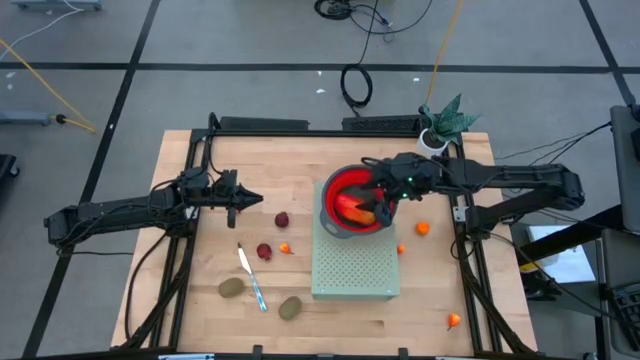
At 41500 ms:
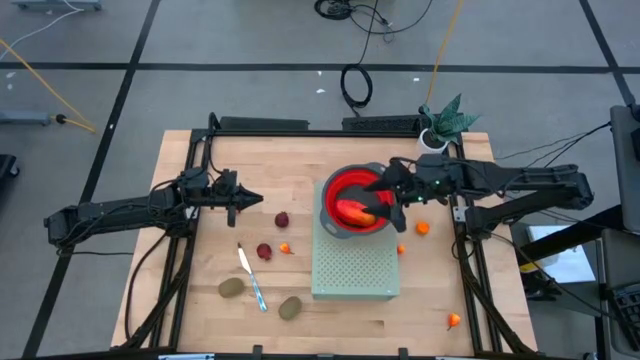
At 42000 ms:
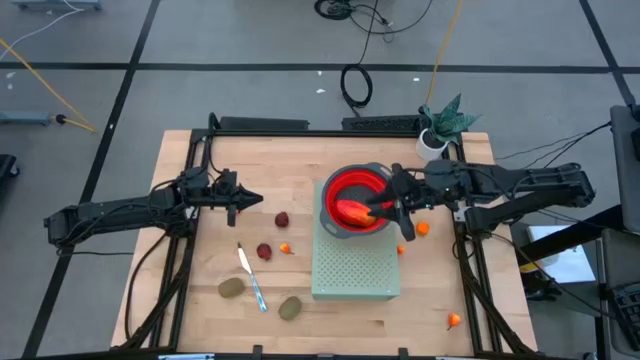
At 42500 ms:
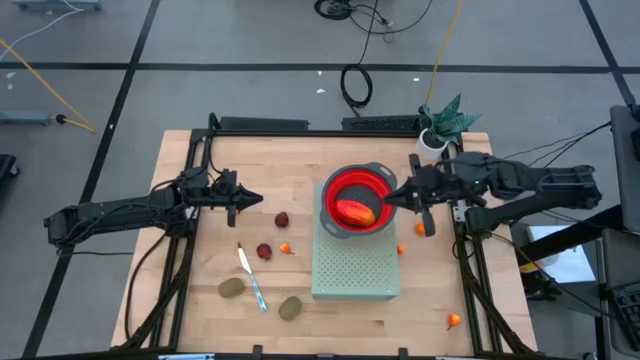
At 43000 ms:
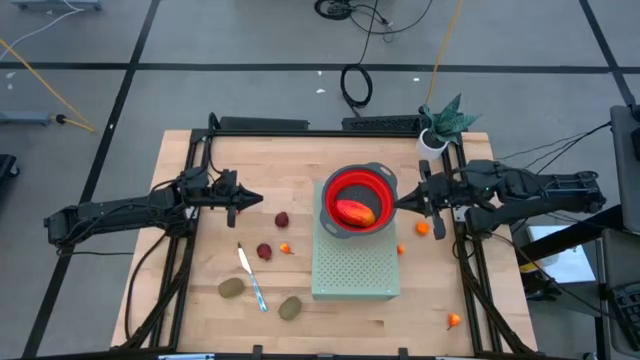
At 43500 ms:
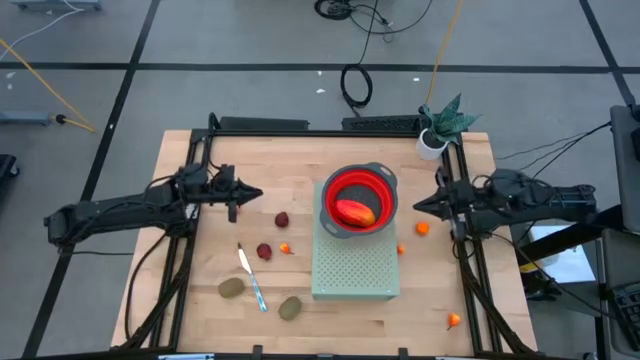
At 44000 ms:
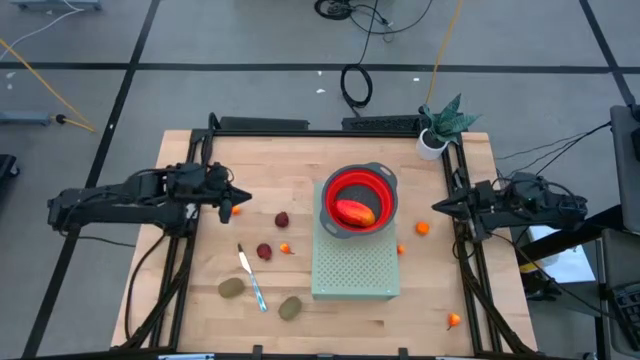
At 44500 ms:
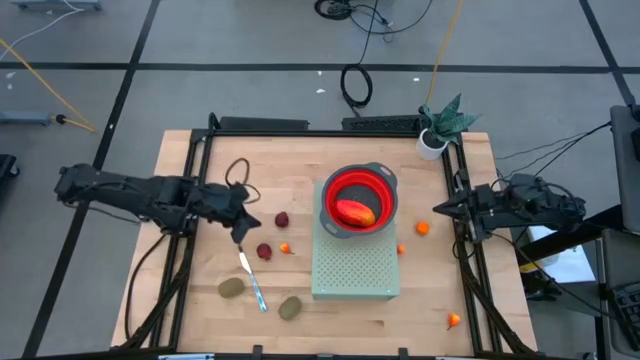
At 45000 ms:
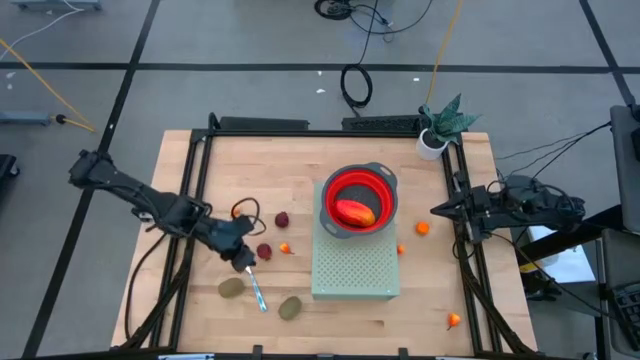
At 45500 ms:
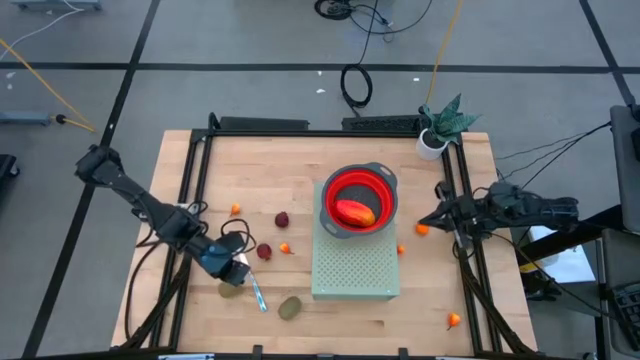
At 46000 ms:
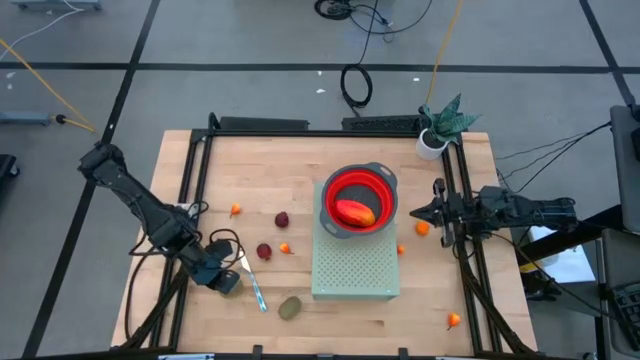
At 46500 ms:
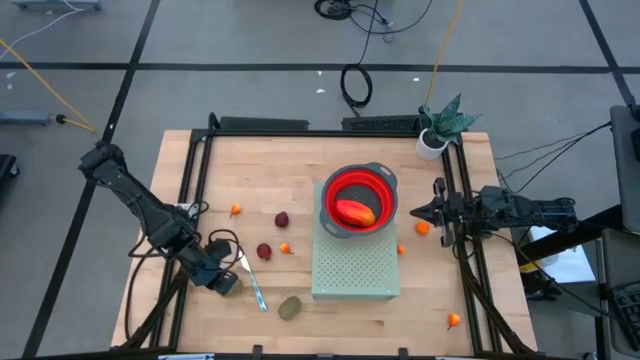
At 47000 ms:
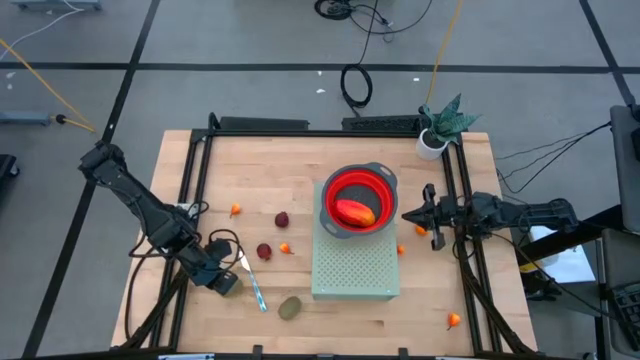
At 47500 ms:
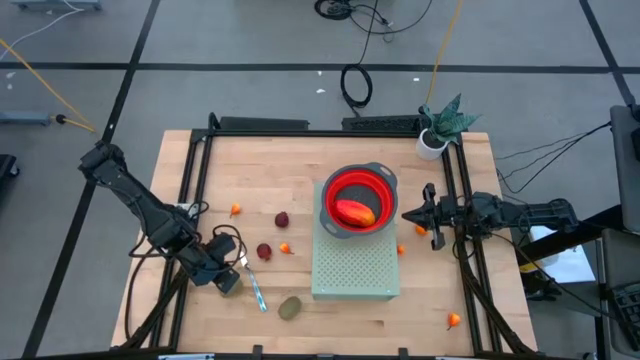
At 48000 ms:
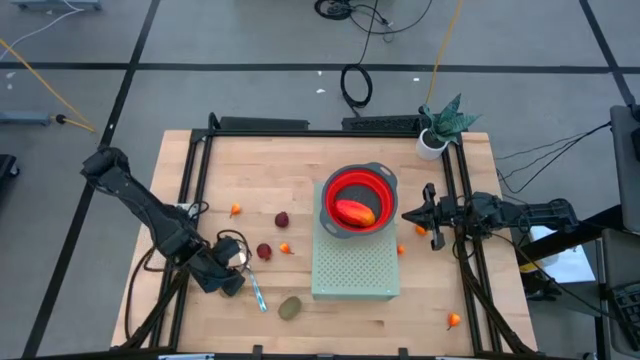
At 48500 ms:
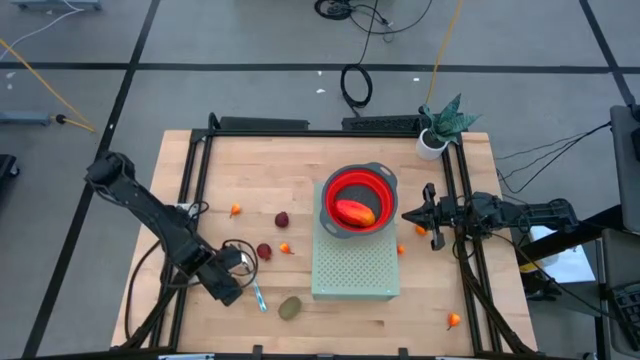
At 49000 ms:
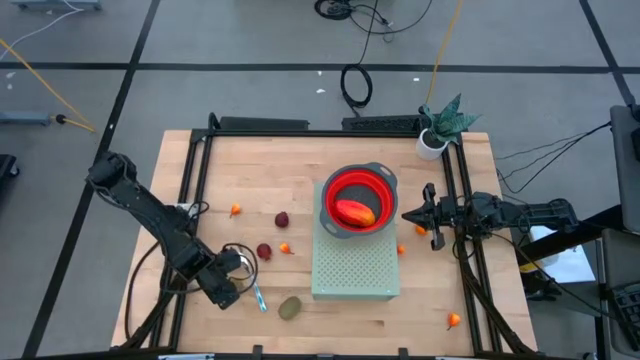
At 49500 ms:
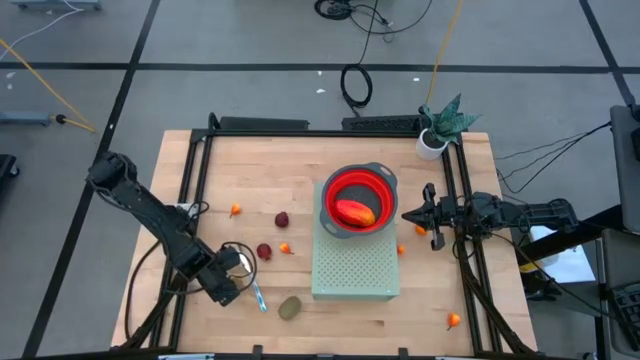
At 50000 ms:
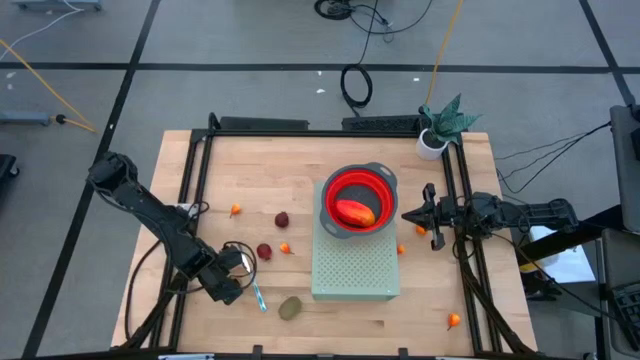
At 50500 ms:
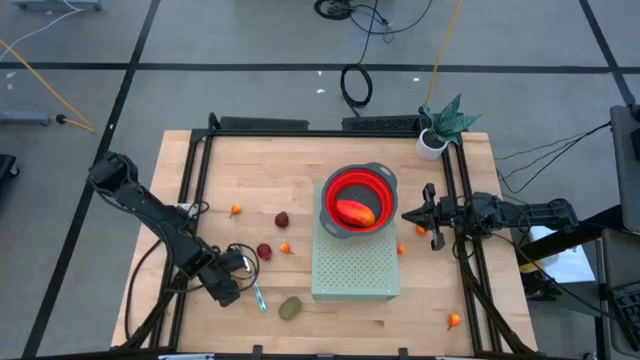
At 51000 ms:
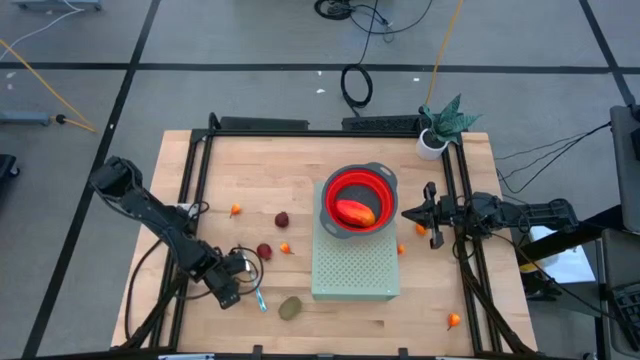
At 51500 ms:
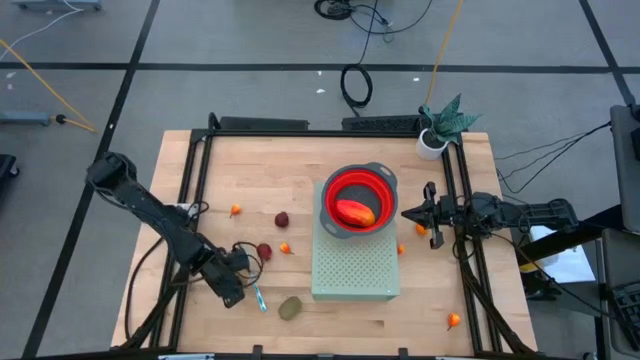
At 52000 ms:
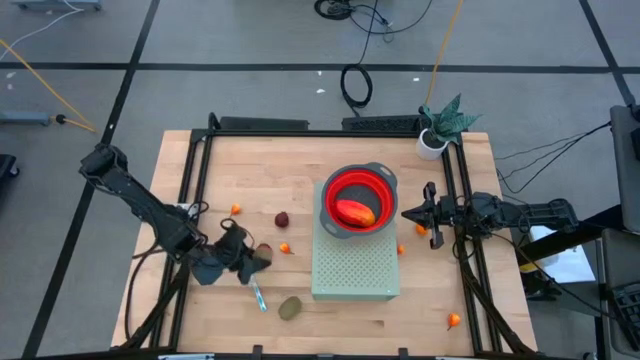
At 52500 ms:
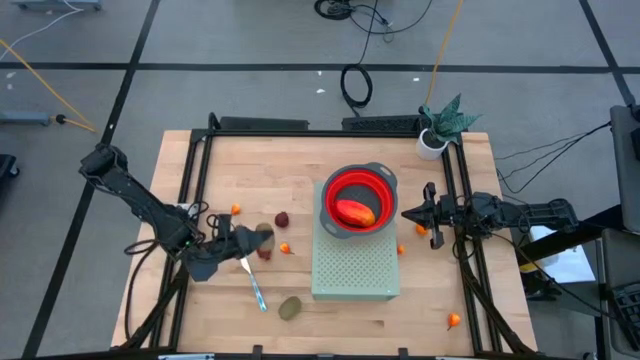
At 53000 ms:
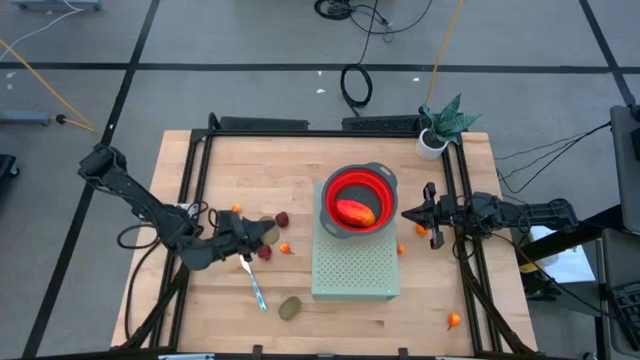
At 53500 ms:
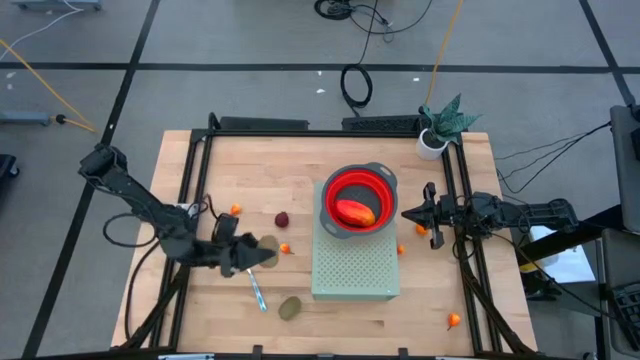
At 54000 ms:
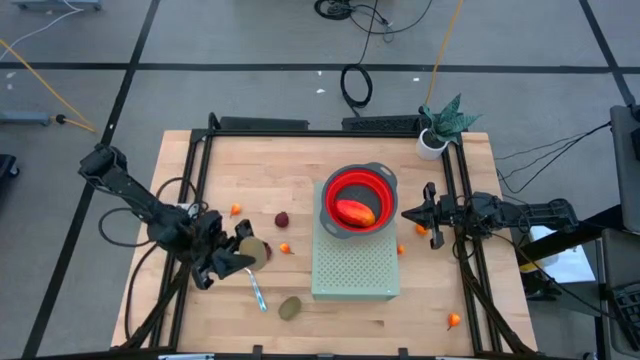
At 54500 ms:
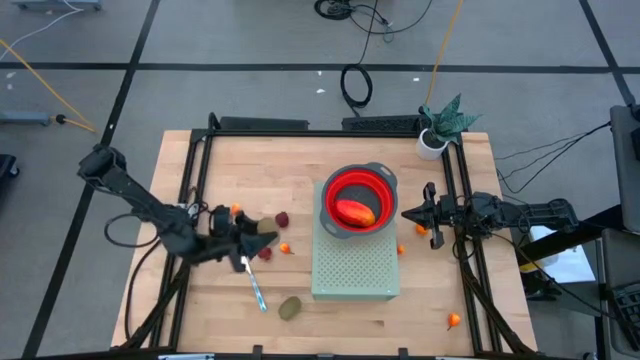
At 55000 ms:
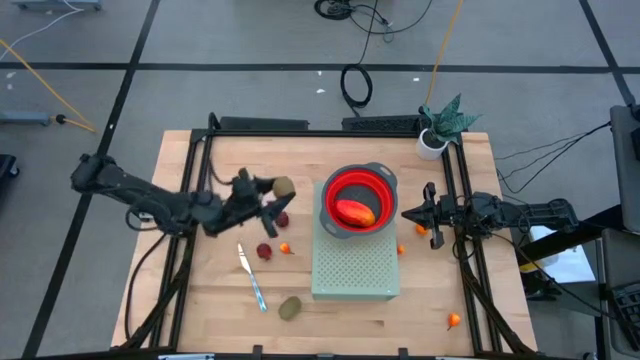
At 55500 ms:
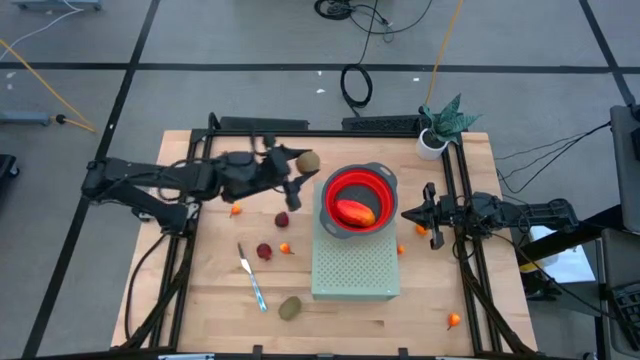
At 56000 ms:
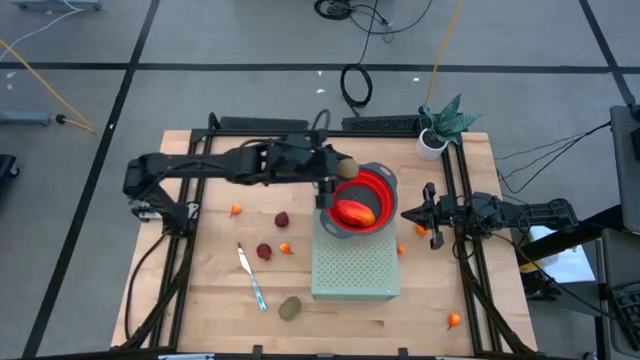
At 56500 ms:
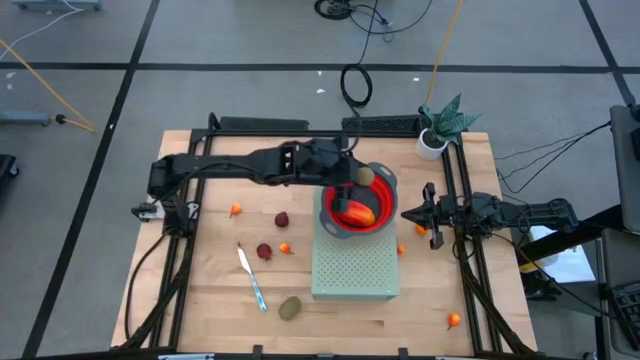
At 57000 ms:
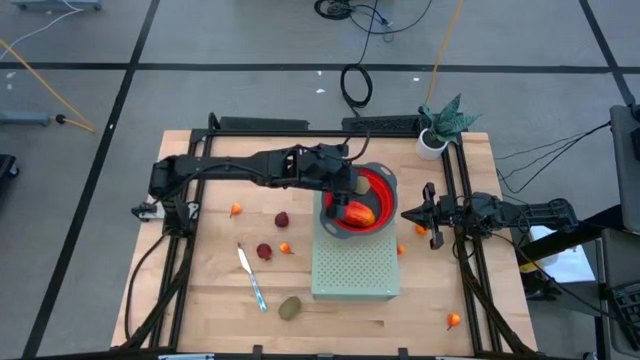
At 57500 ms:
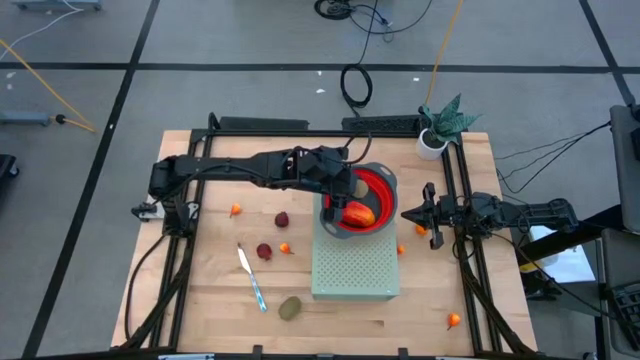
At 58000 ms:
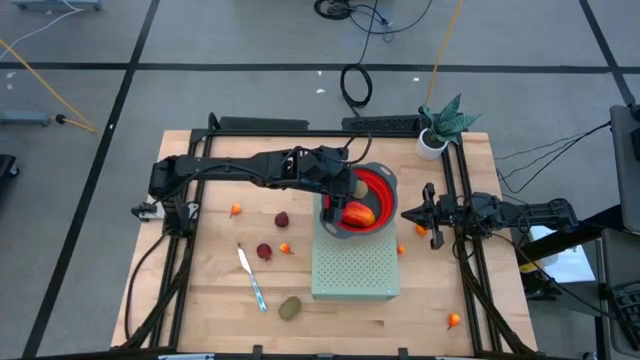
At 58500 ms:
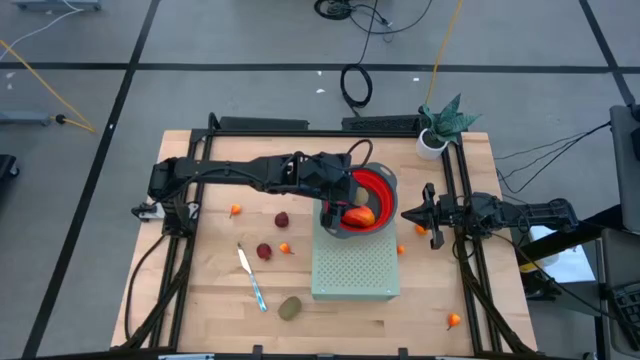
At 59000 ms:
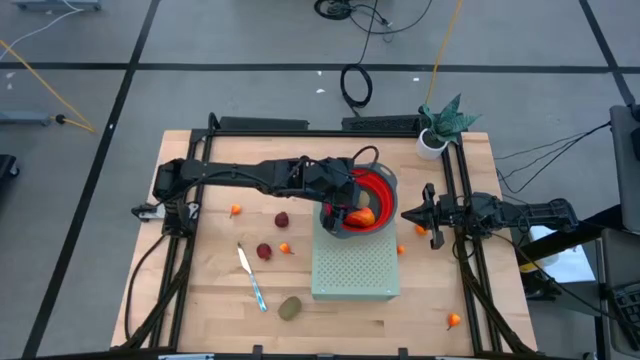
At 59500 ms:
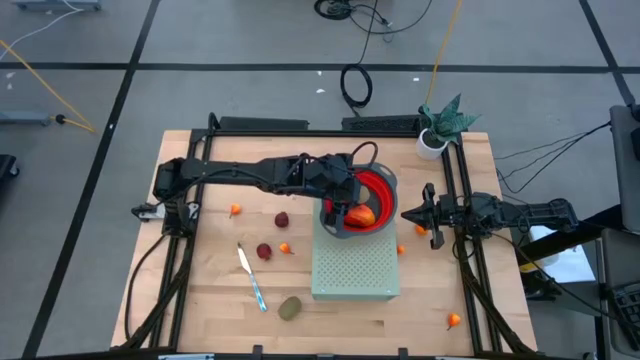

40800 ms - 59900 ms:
Task: Pick & Place Fruit
Put the kiwi into the red strainer bowl on the shelf
